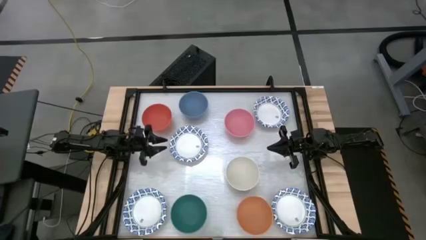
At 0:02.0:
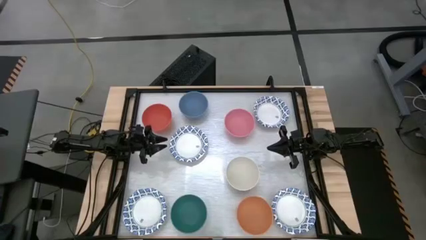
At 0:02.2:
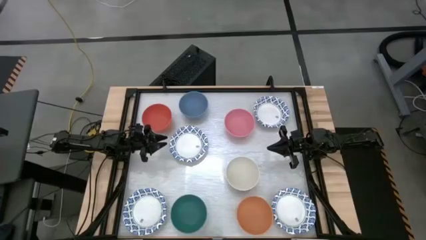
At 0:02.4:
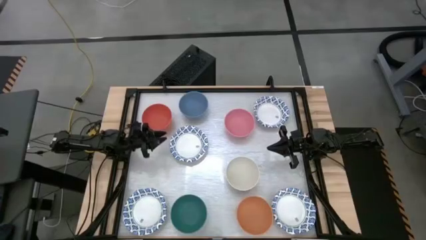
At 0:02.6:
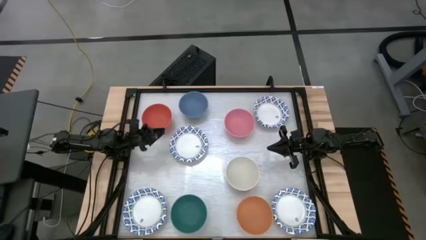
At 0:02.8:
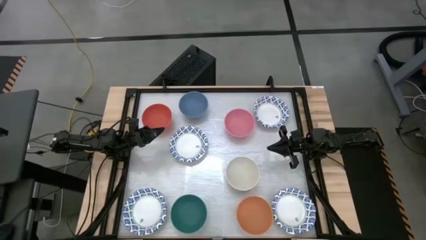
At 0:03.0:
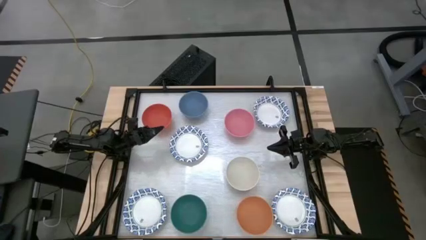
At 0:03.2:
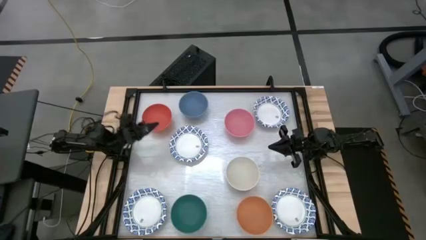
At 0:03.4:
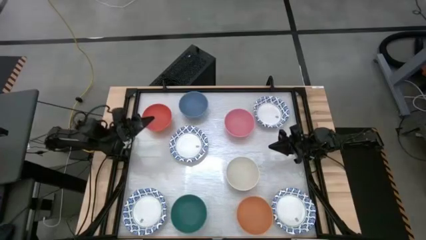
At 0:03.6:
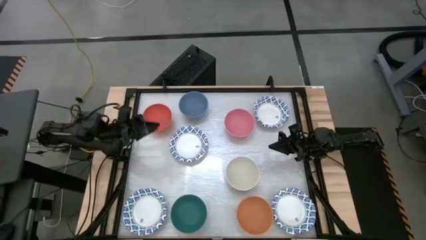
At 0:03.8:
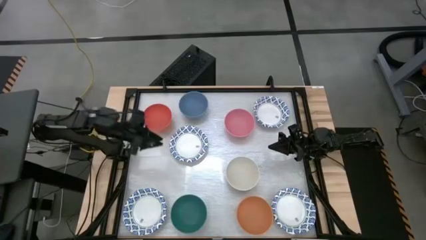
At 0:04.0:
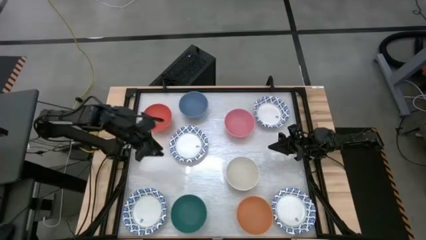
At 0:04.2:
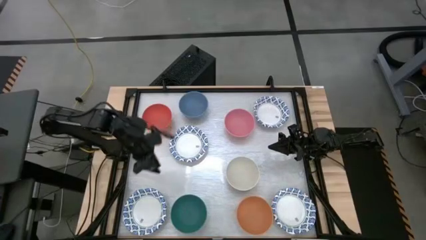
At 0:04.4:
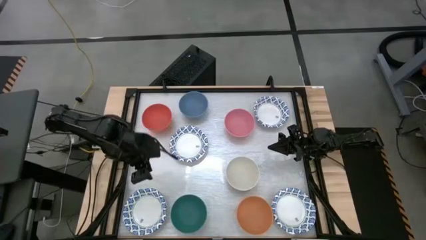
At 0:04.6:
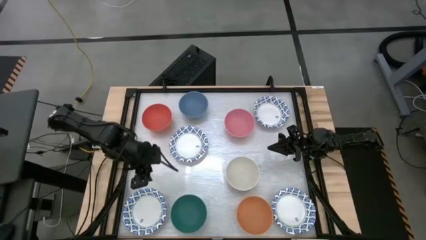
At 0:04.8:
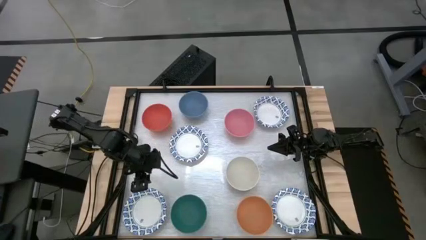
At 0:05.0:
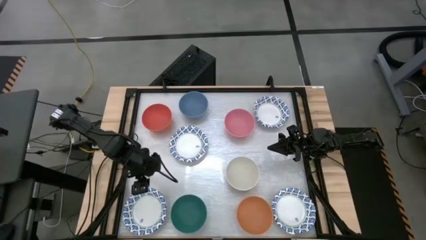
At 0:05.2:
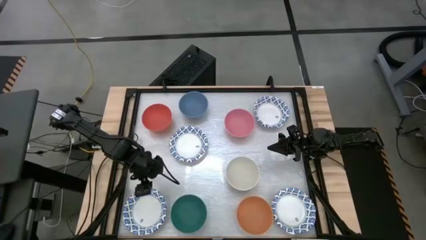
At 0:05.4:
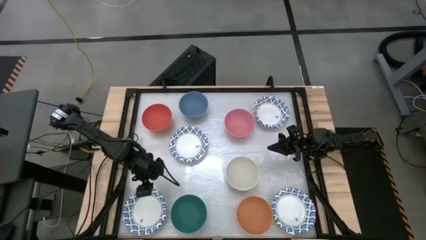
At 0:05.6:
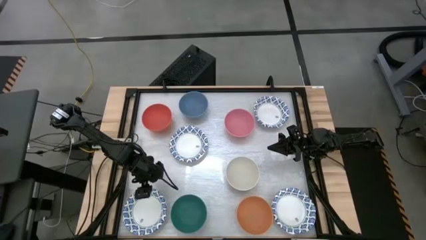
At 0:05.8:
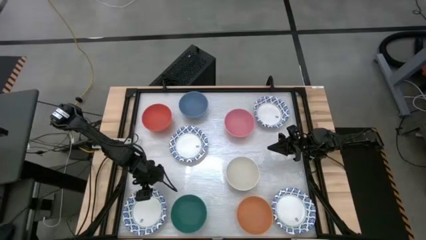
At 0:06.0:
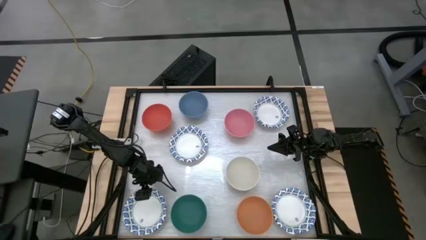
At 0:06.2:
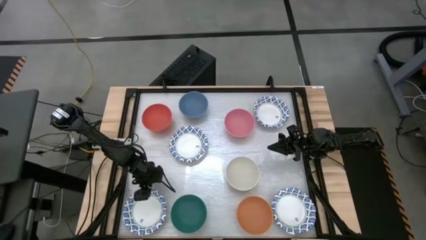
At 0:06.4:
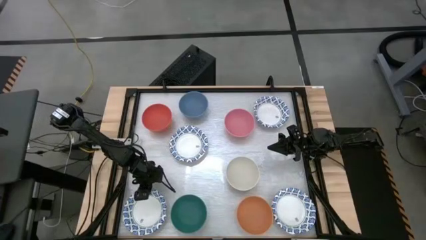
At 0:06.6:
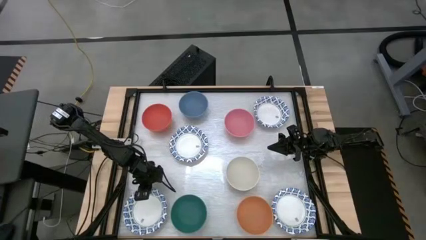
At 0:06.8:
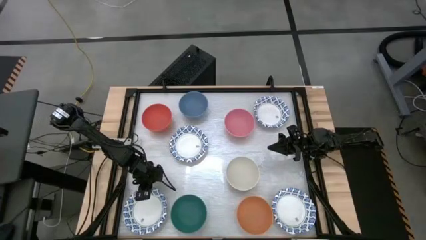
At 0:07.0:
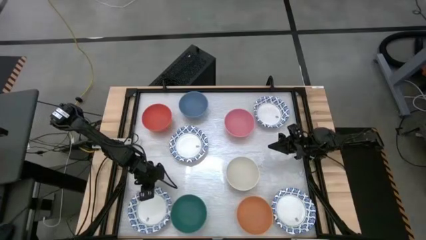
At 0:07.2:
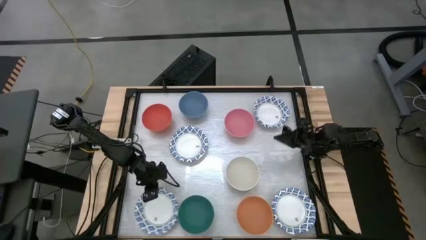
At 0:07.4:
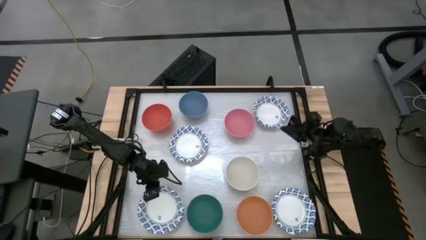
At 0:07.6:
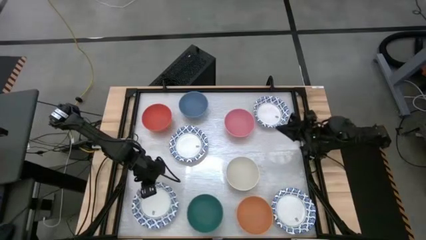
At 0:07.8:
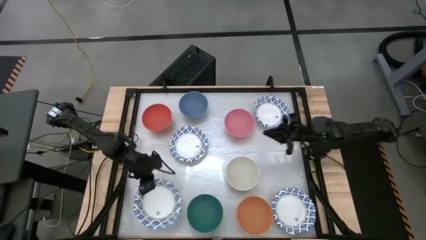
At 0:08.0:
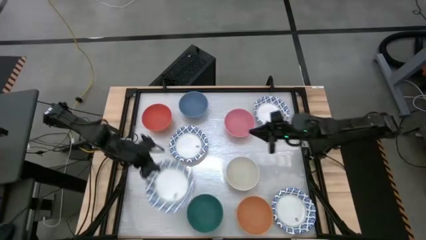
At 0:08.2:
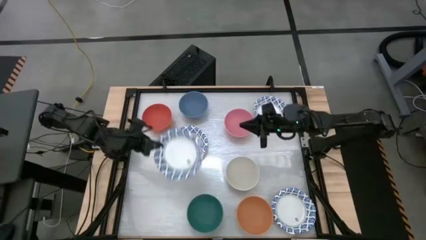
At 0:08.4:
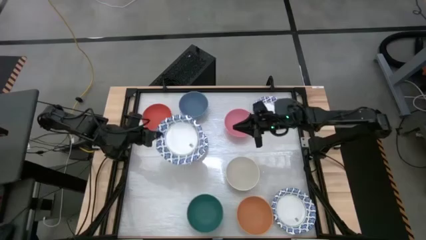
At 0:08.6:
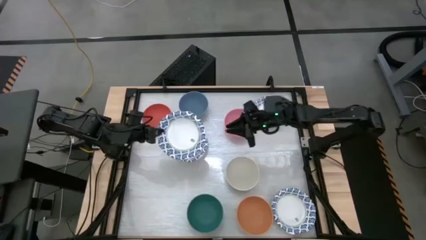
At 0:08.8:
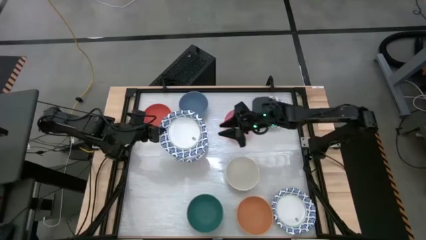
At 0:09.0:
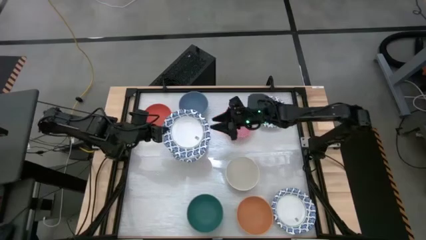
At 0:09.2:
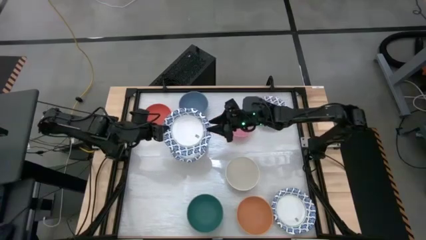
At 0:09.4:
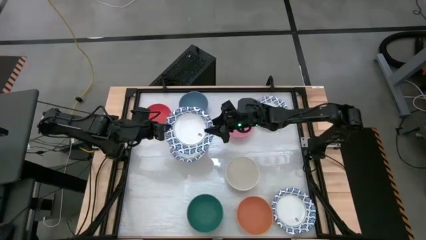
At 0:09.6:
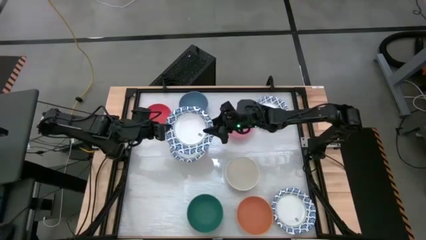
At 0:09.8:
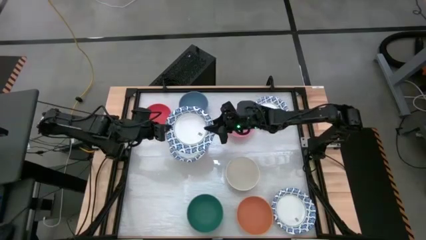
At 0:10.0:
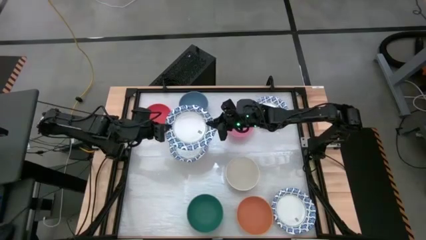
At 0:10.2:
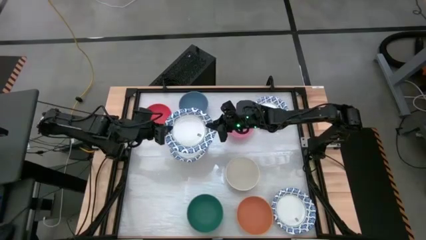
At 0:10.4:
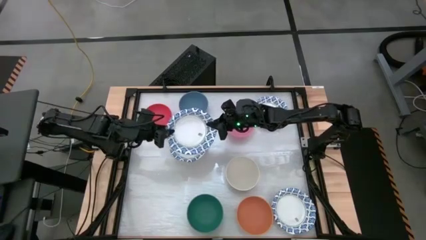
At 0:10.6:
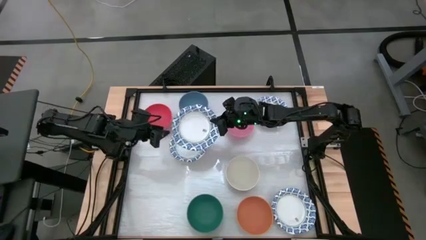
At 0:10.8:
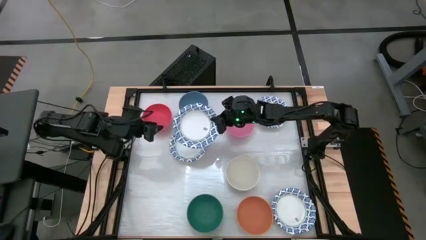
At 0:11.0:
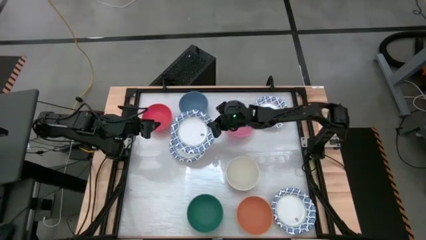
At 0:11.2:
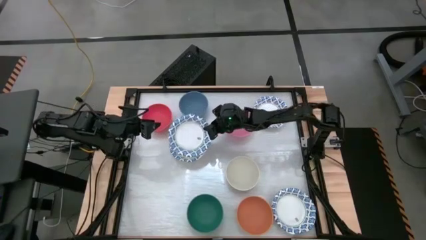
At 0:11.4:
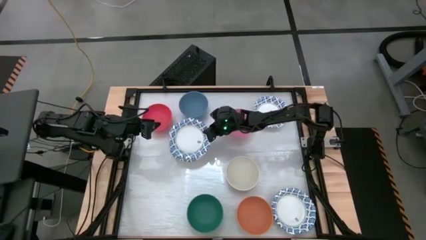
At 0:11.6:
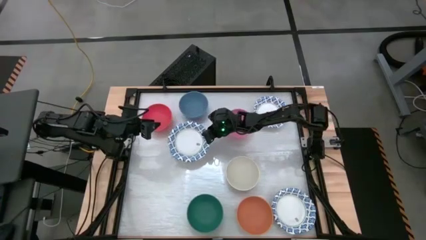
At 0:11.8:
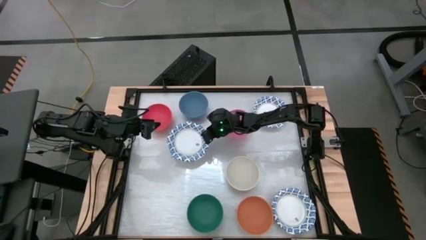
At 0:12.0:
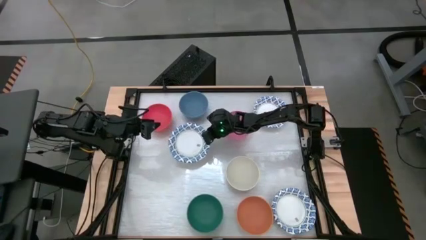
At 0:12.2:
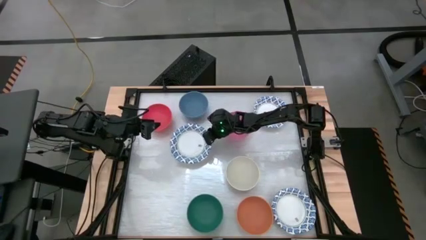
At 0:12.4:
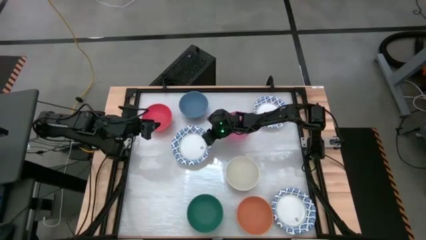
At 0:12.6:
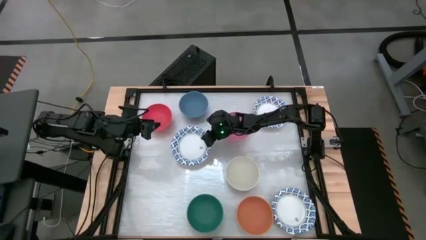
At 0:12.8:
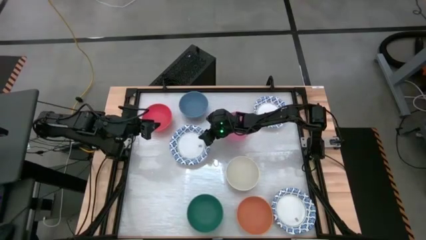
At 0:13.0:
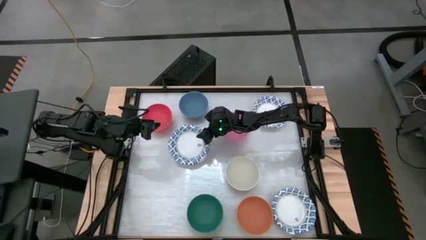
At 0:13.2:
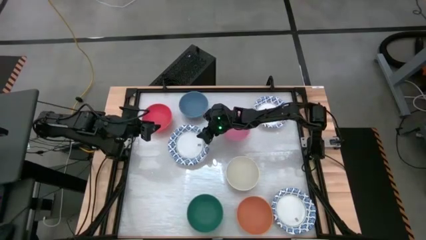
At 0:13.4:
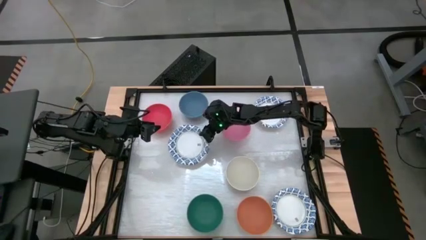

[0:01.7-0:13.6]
Stack the blue patterned bowl on top of the blue patterned bowl
